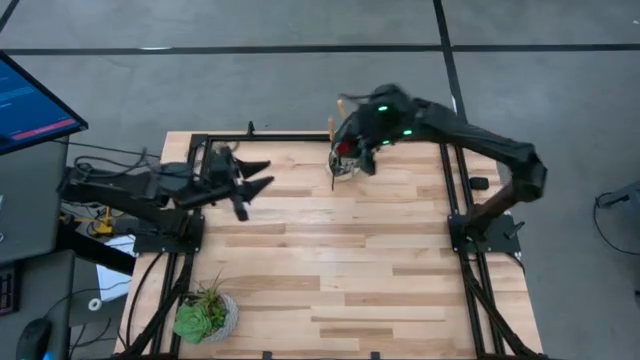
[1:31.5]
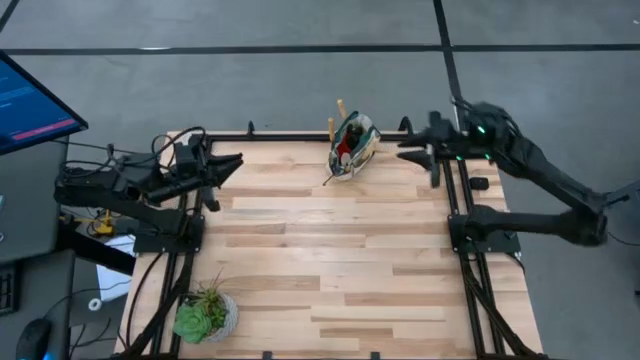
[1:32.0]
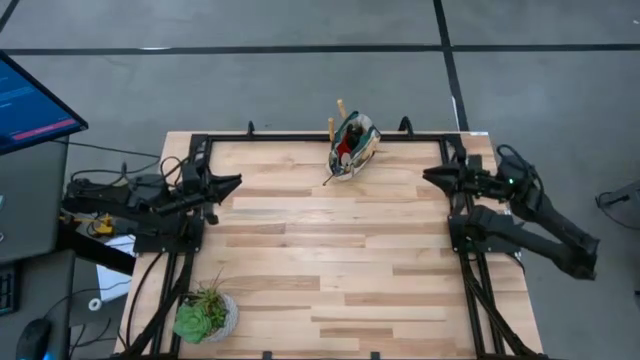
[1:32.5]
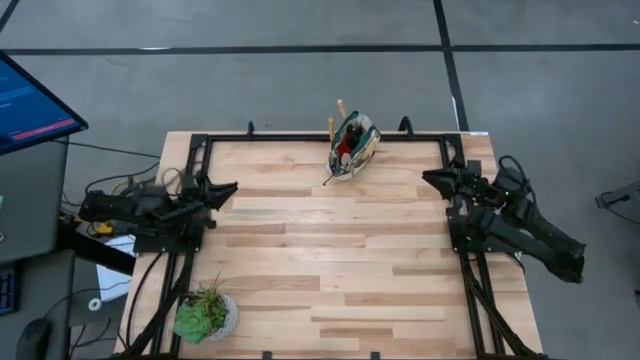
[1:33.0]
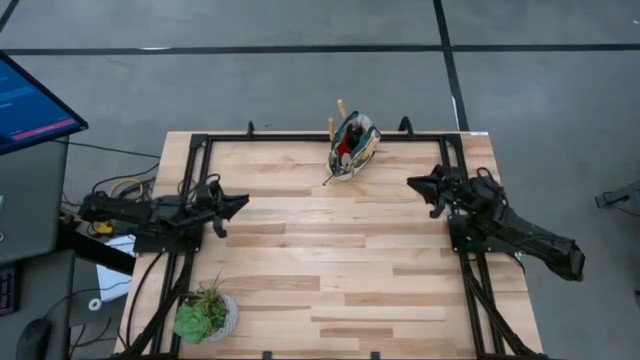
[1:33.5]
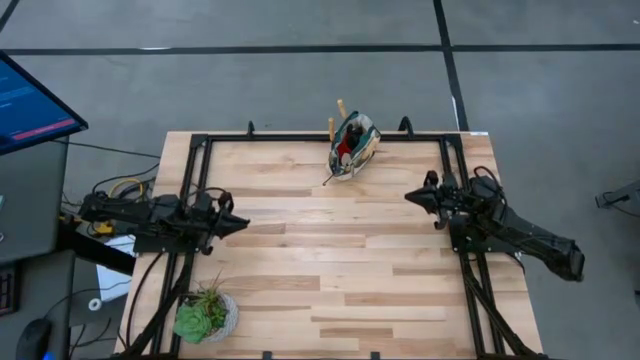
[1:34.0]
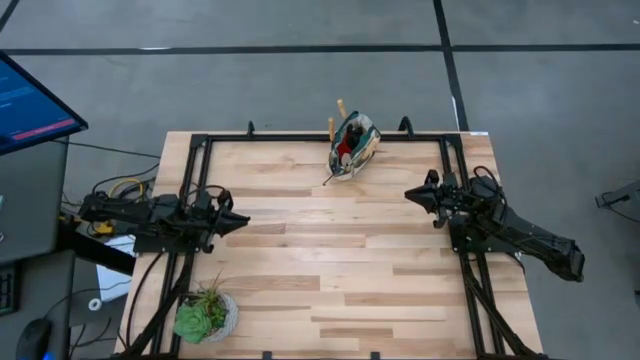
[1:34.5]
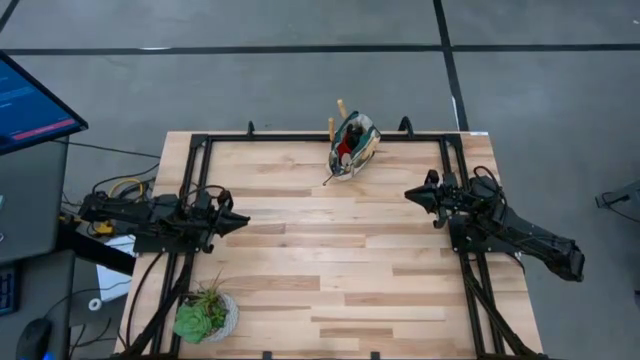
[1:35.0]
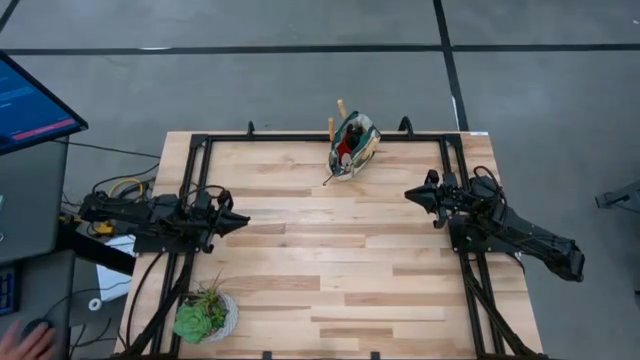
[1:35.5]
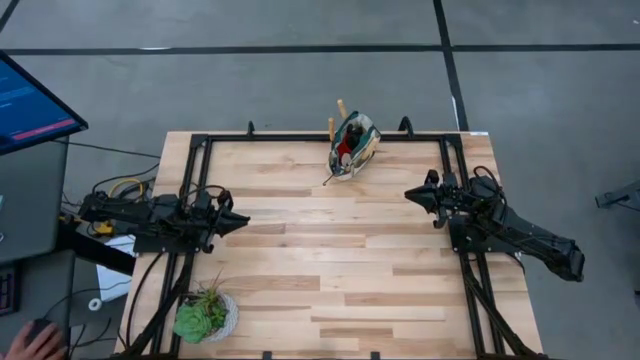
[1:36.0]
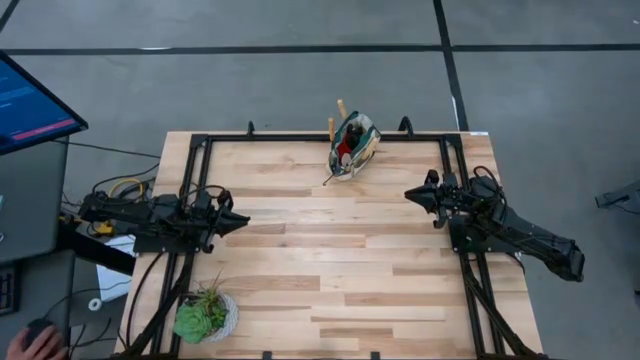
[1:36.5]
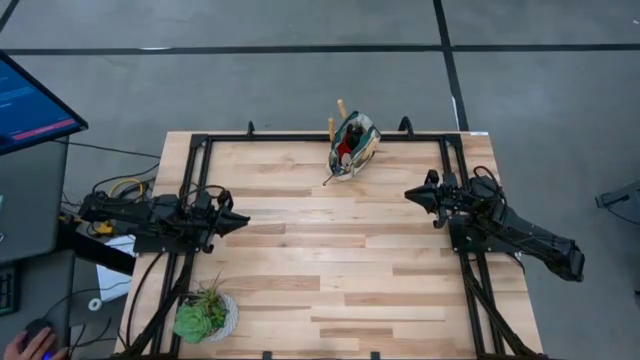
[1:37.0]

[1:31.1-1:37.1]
Task: Pick & Place Garden tools in Gardening bag
Return to Home Position

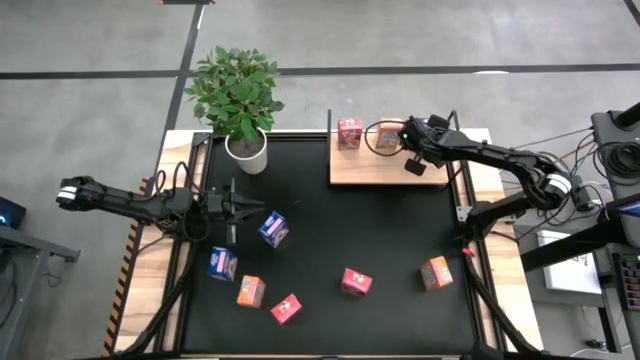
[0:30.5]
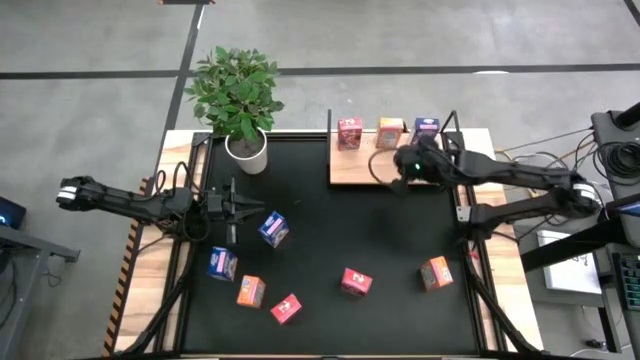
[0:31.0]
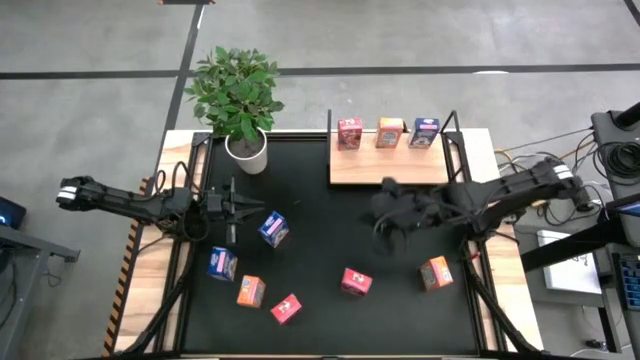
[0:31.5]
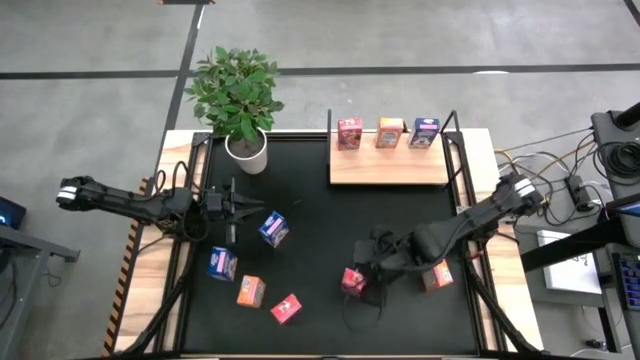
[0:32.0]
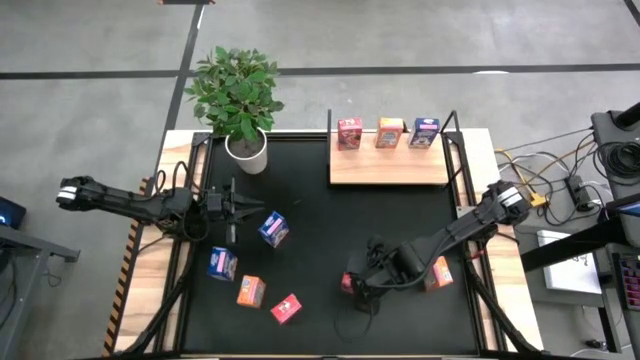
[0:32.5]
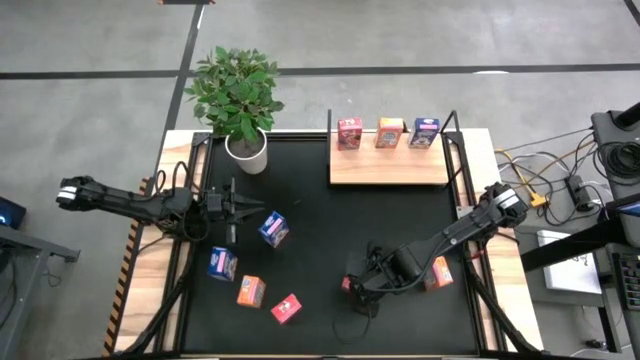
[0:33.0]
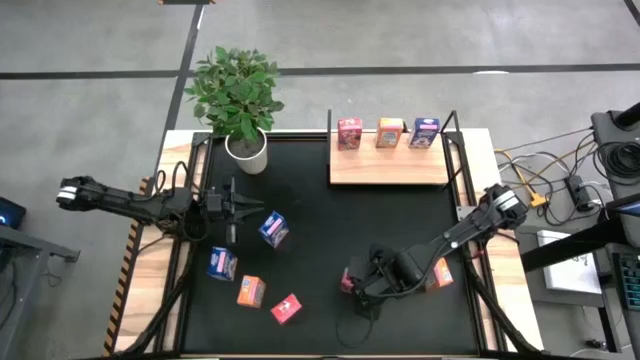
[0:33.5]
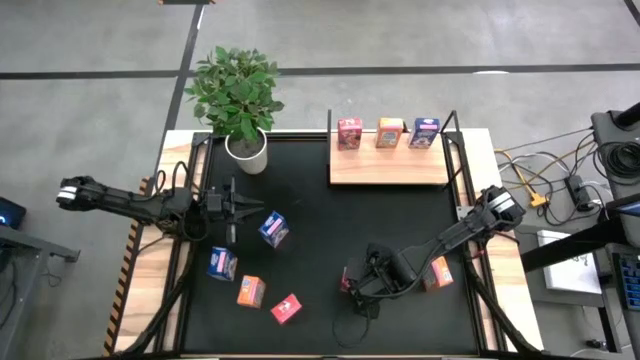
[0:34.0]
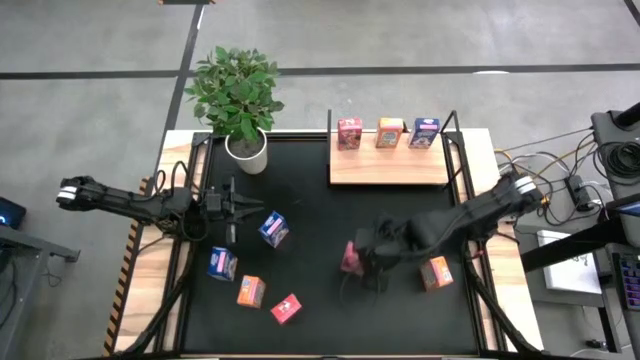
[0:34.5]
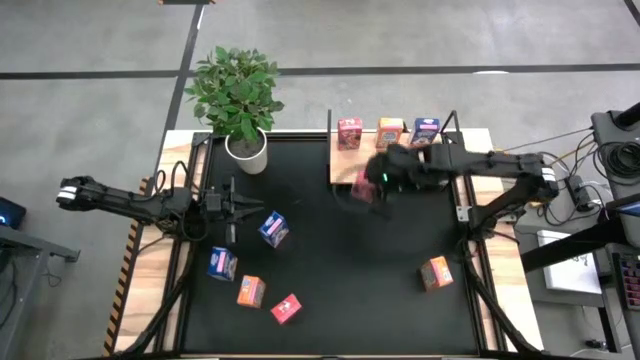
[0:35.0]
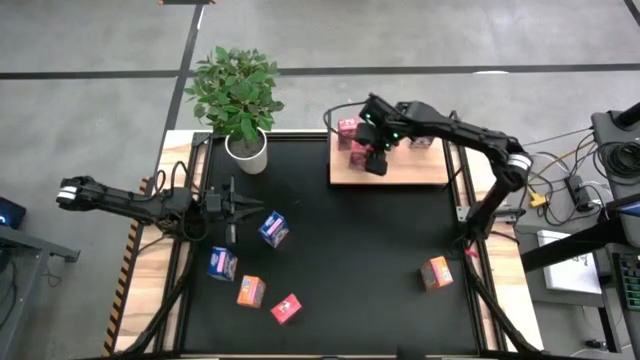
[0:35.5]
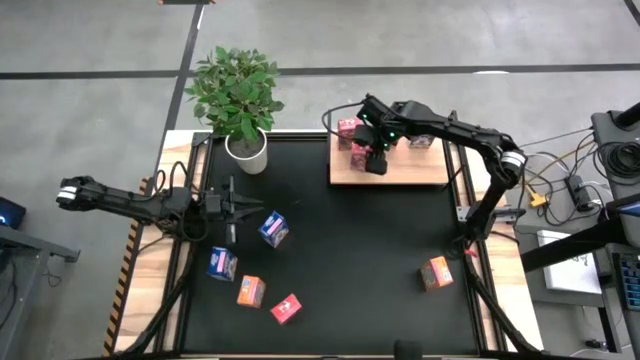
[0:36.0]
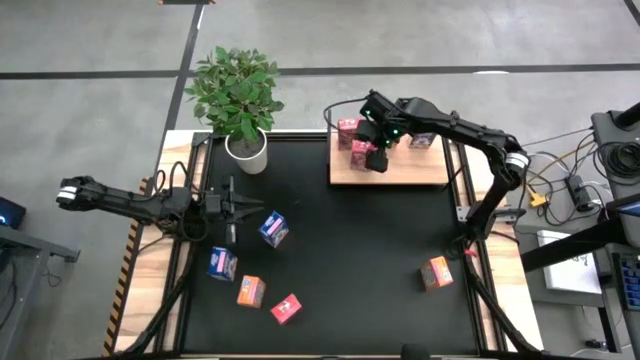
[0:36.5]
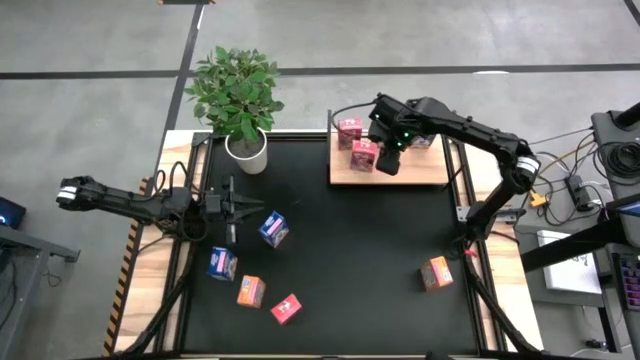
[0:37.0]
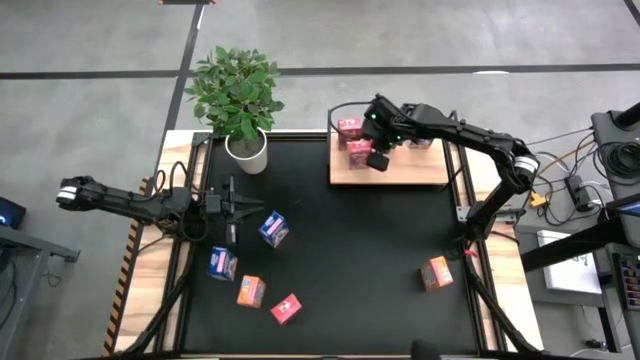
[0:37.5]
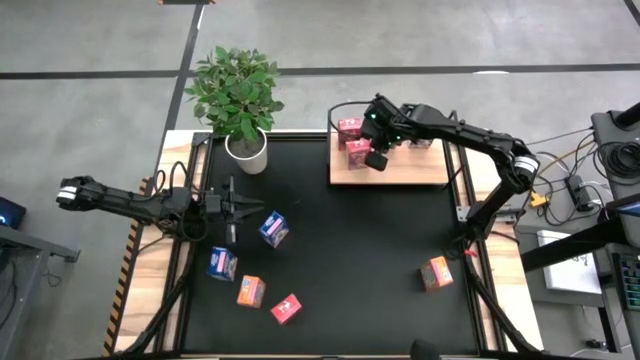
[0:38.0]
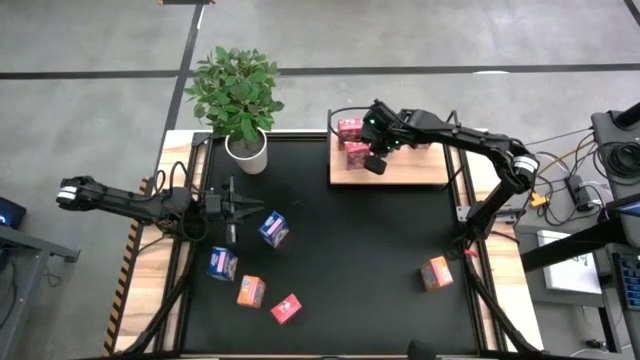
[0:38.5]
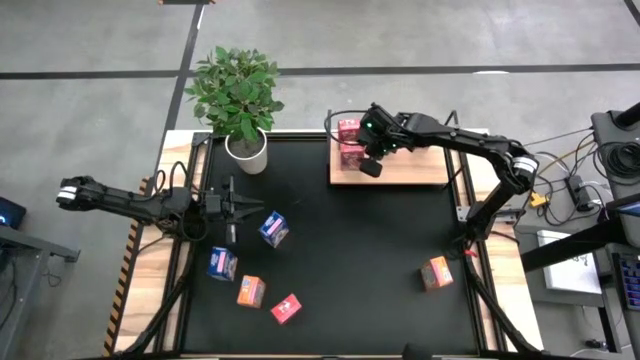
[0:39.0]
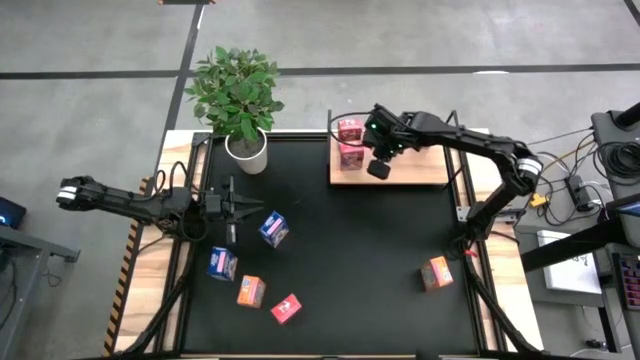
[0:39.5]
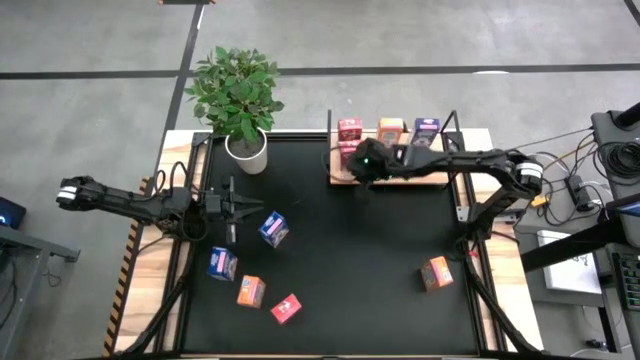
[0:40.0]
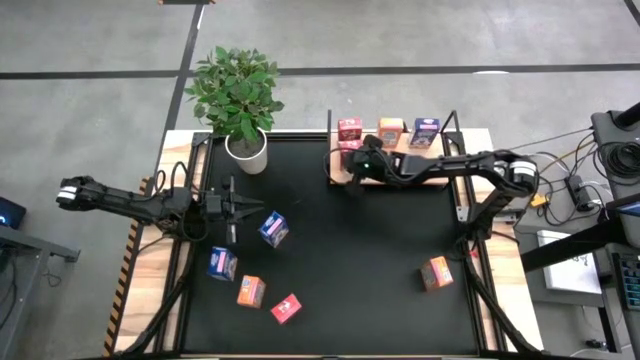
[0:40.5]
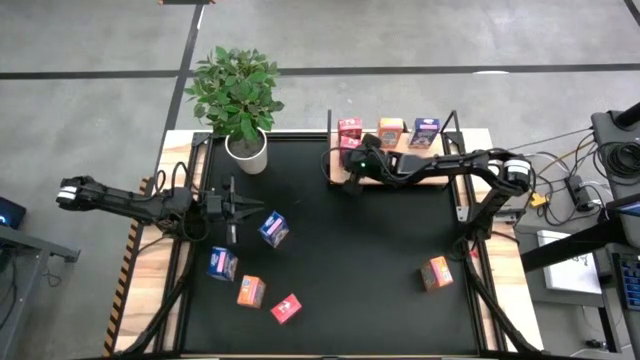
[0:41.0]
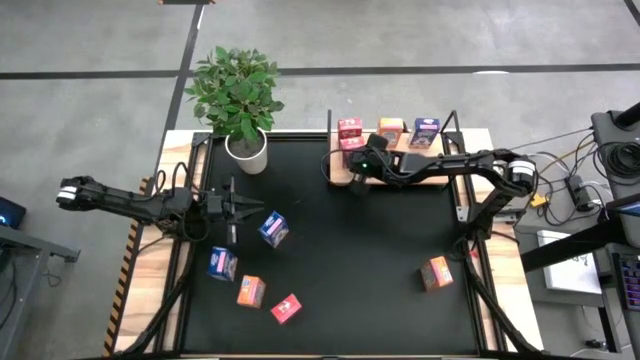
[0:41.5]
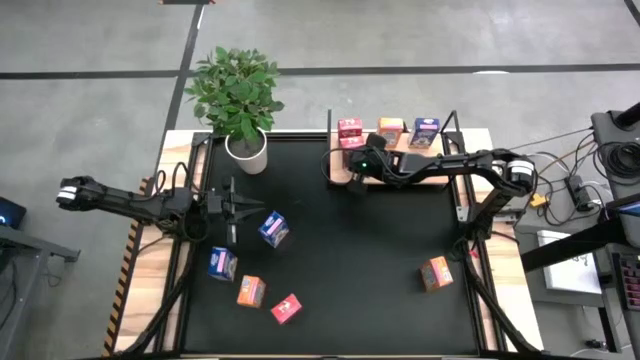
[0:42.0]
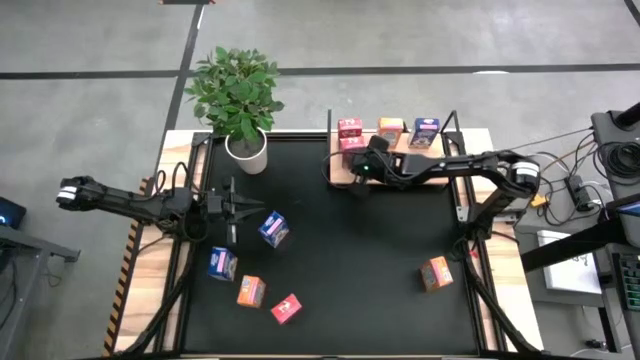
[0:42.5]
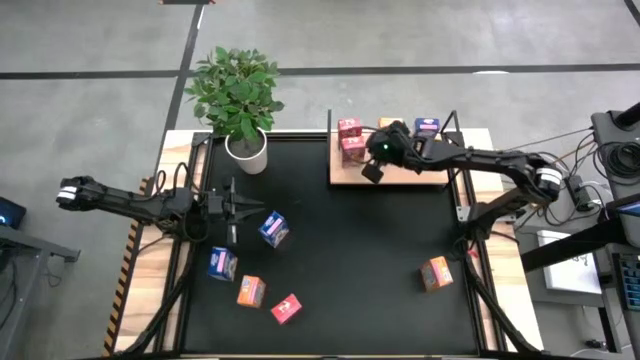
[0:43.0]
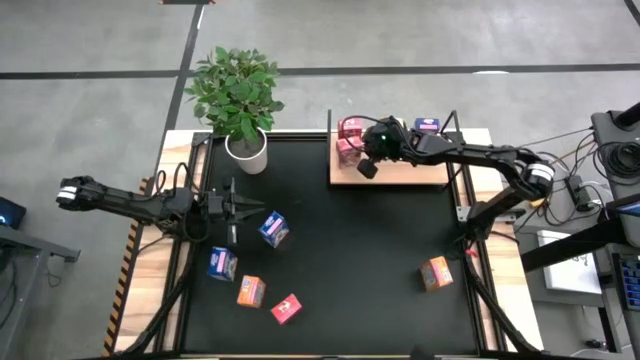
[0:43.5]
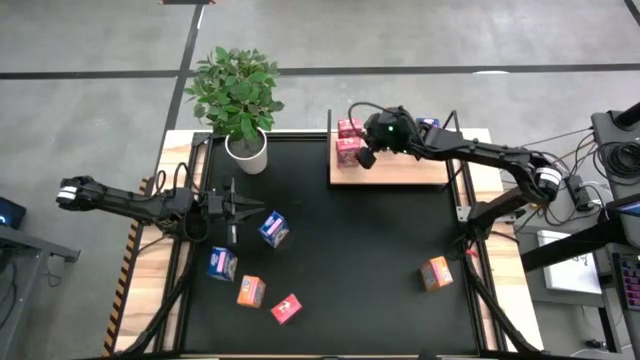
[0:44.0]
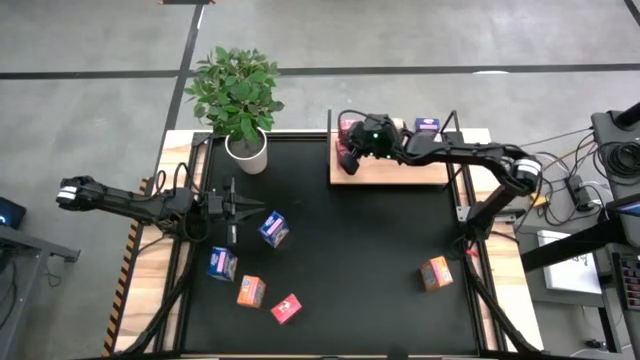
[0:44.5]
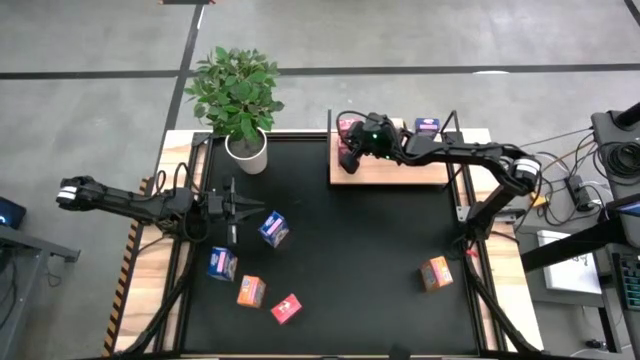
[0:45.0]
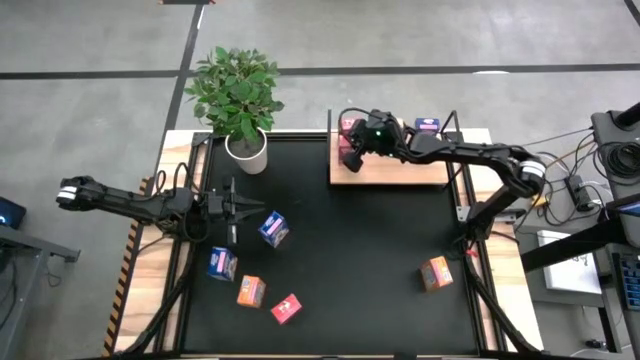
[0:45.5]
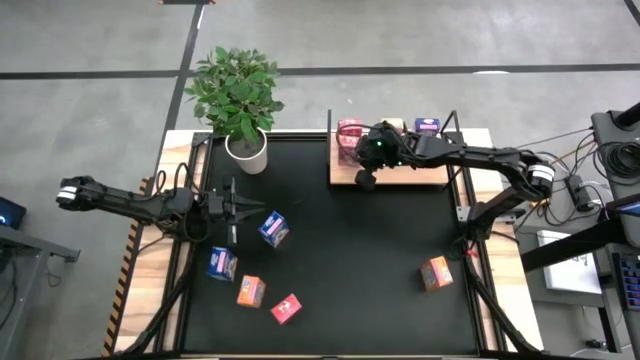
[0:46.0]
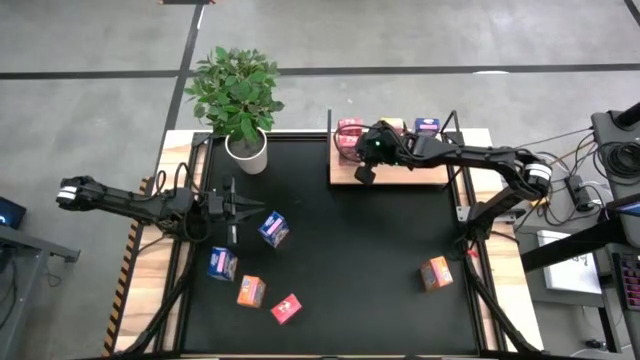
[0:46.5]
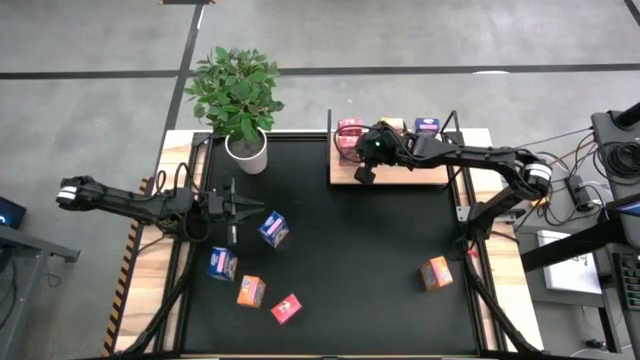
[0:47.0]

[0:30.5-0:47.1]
Task: Stack cereal on shelf
Put the right red cereal box on the shelf aligned with the other red cereal box
